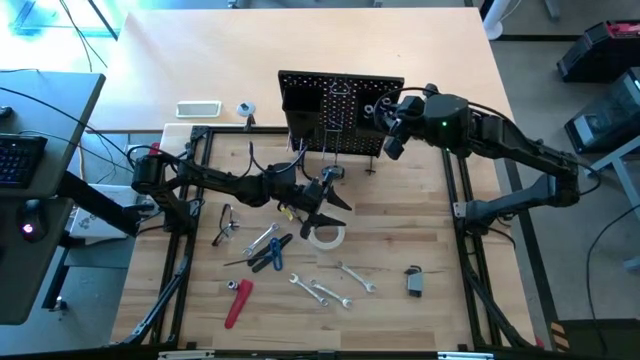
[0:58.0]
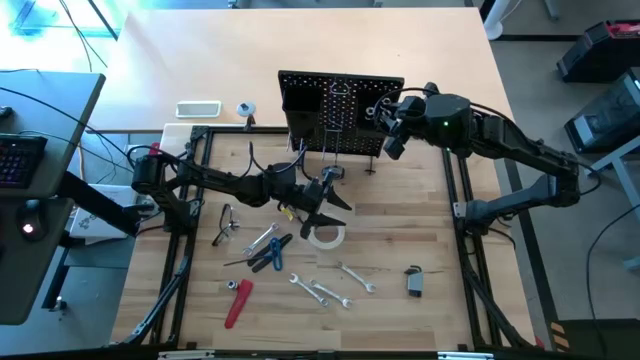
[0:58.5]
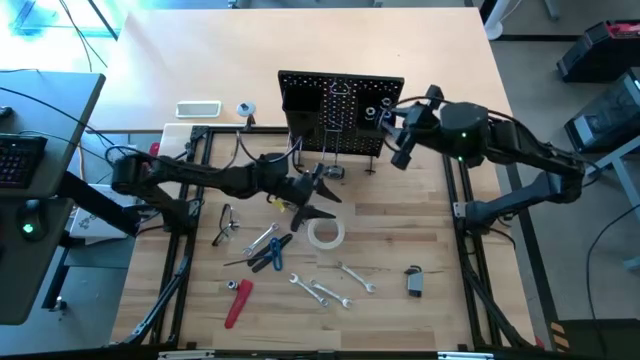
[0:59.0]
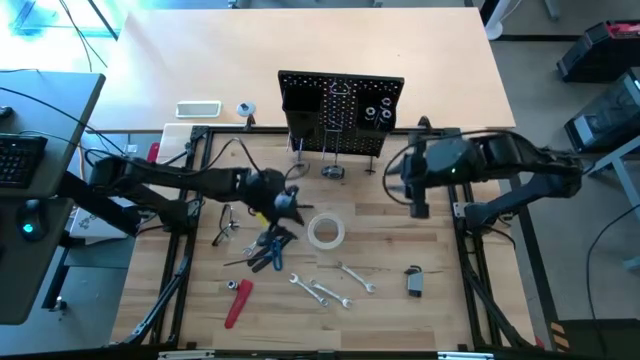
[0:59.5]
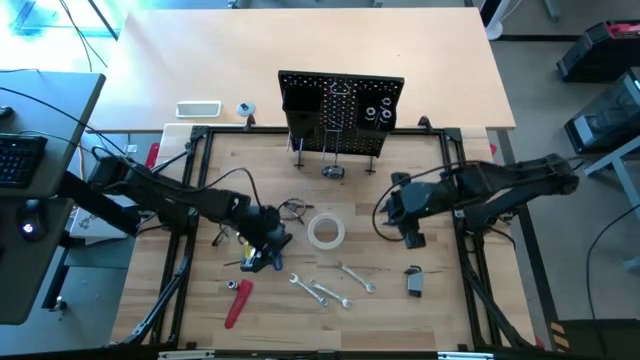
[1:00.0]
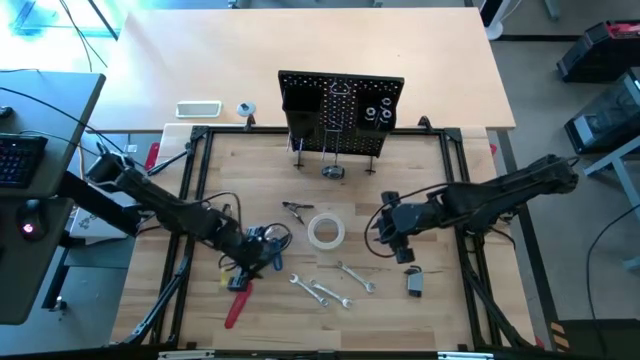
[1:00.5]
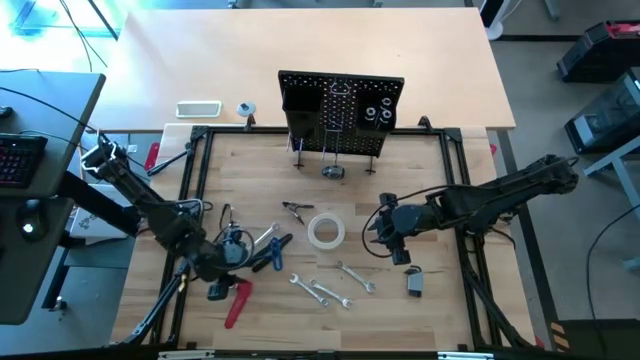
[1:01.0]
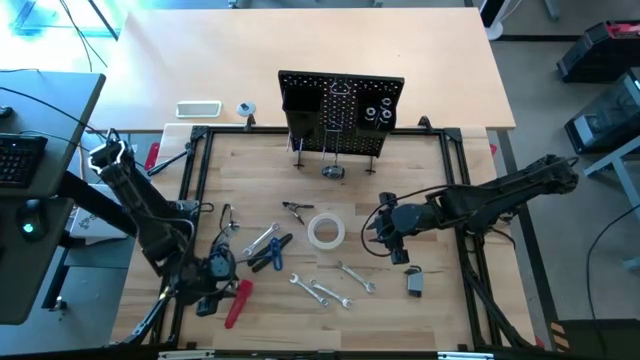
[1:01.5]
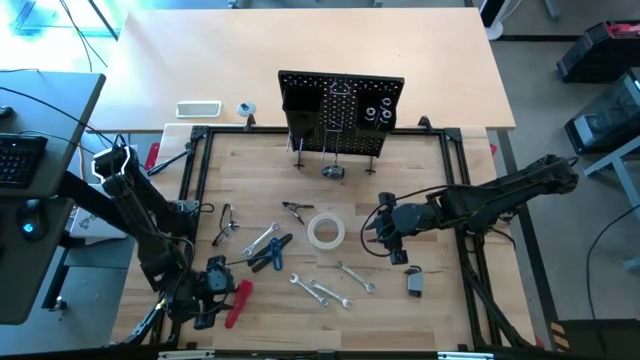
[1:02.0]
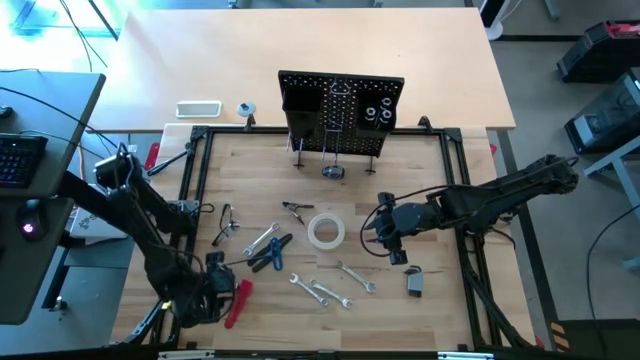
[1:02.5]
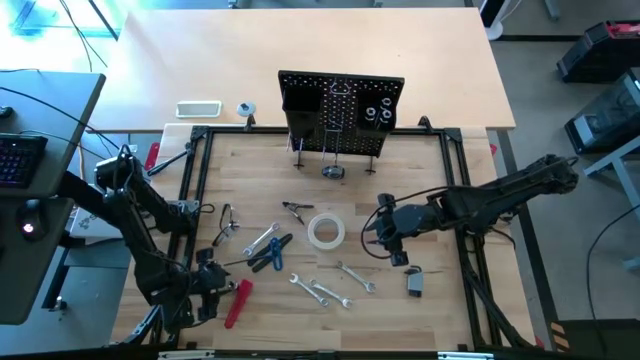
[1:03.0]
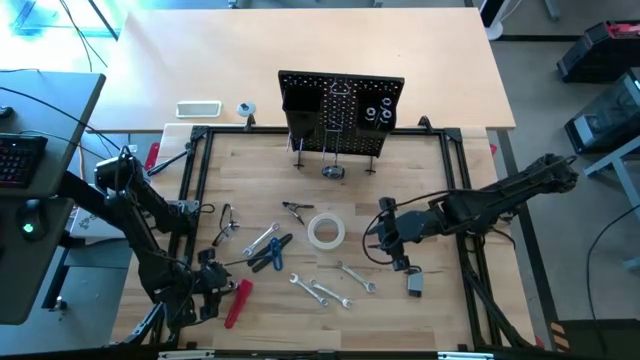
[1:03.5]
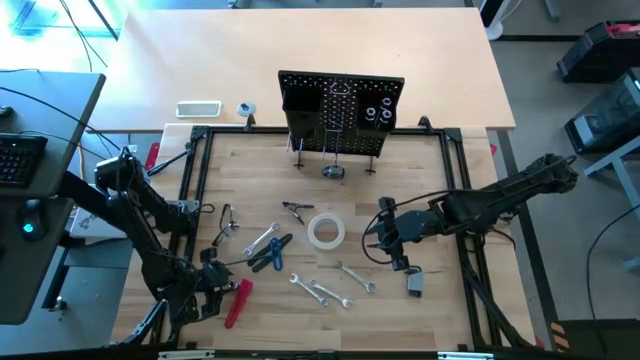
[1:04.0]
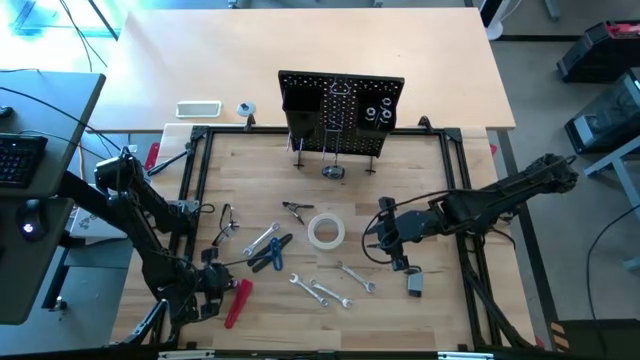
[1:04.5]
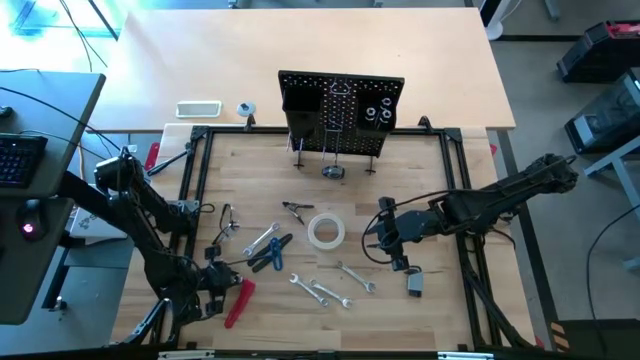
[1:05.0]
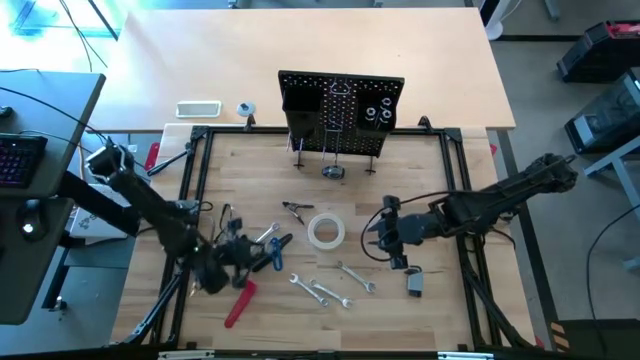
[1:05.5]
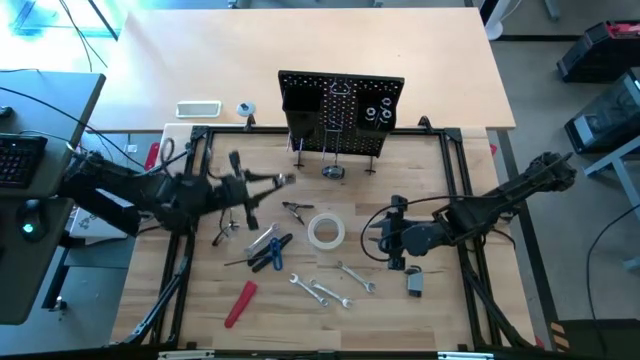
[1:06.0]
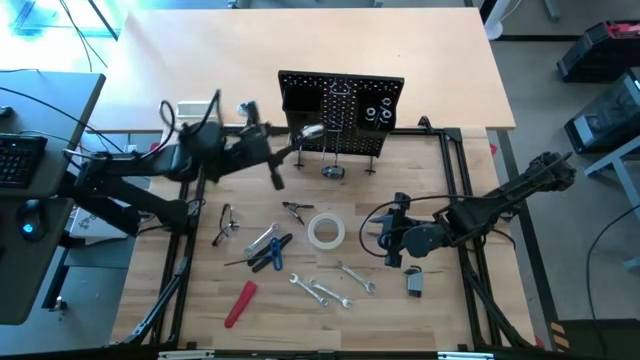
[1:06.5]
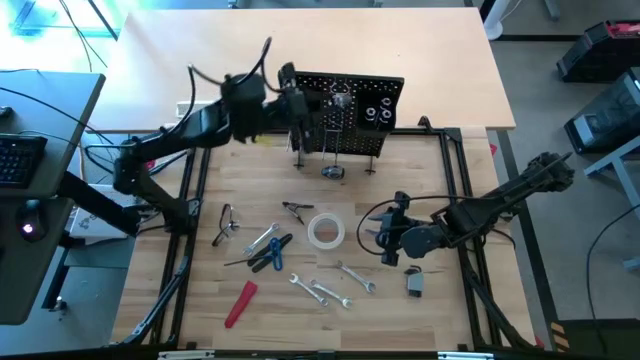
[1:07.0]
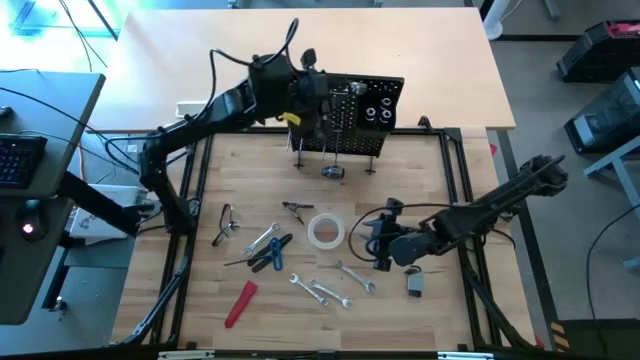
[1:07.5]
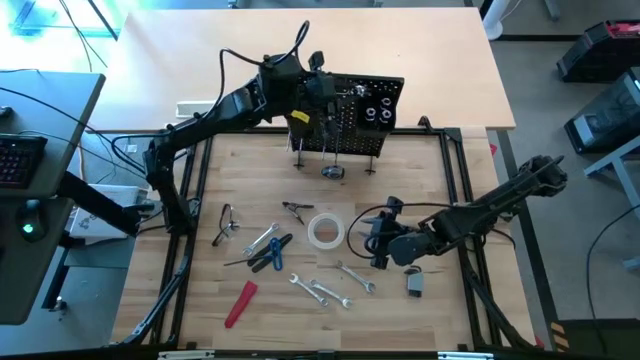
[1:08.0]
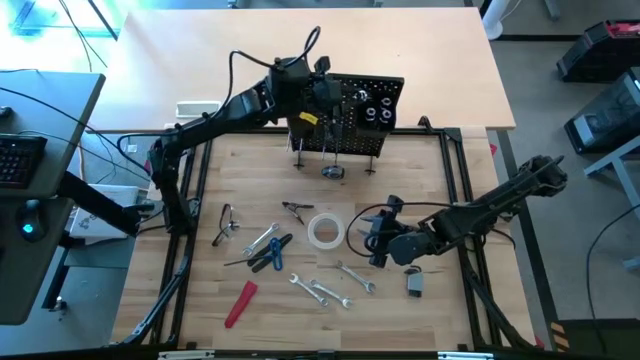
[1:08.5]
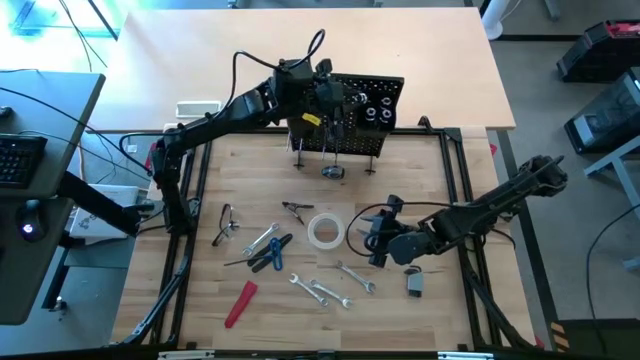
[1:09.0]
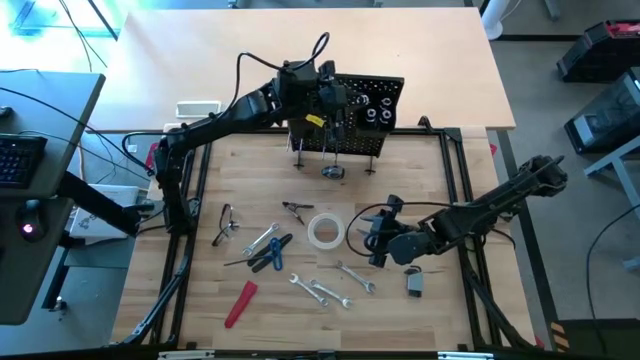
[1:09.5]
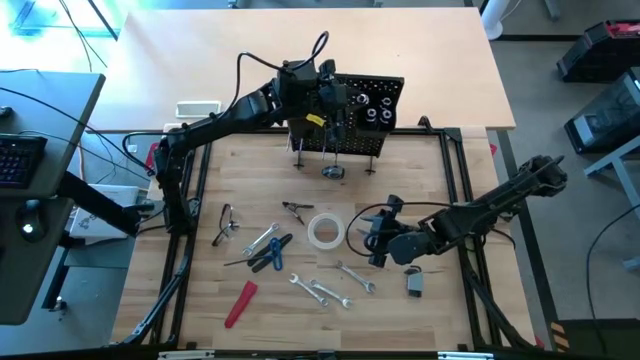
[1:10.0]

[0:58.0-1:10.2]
Task: Hang tools onto peg board
Put the silver socket into the right black bin on the peg board

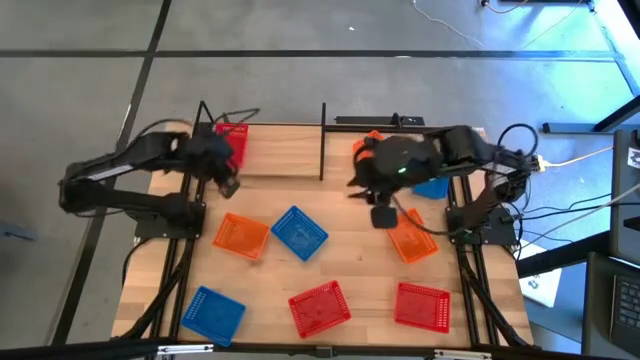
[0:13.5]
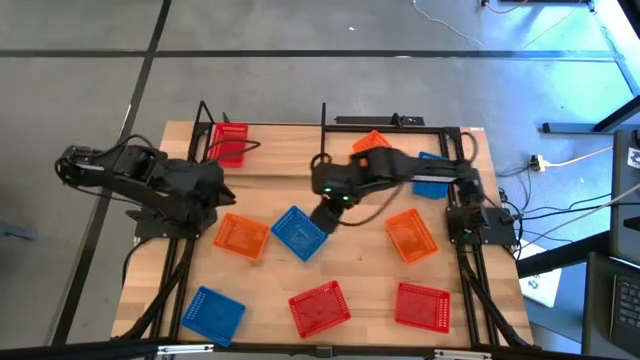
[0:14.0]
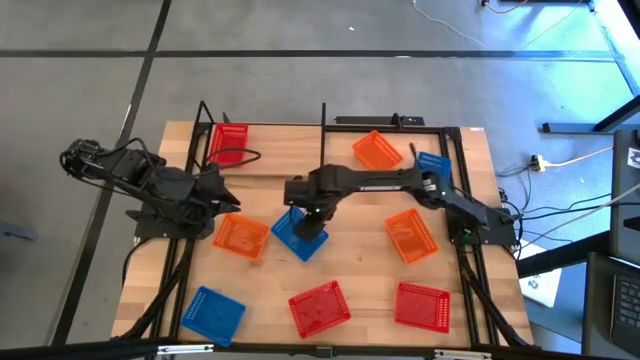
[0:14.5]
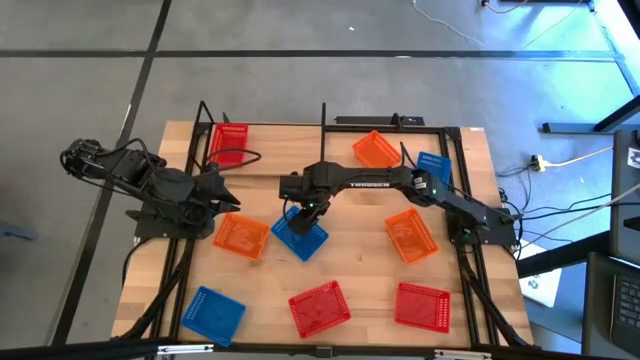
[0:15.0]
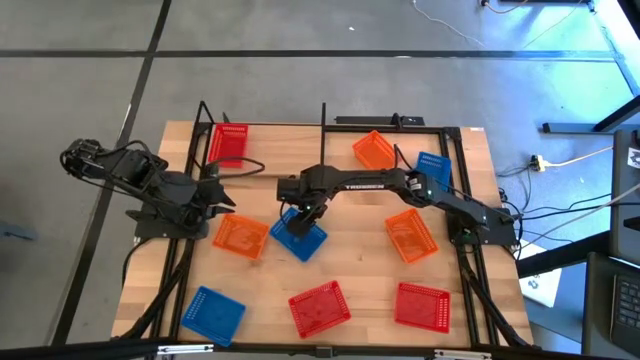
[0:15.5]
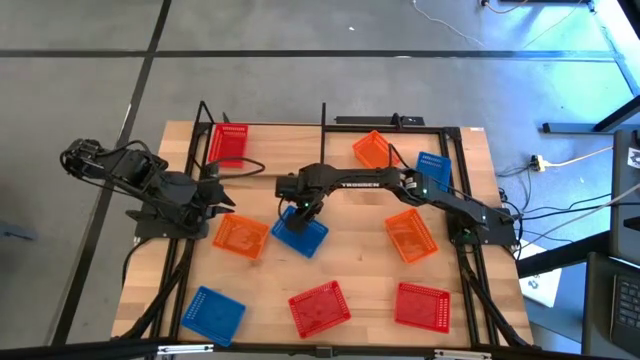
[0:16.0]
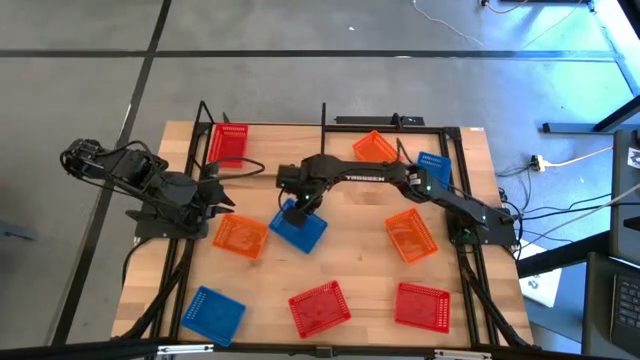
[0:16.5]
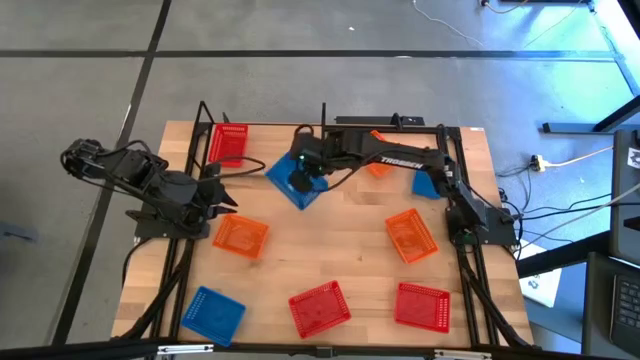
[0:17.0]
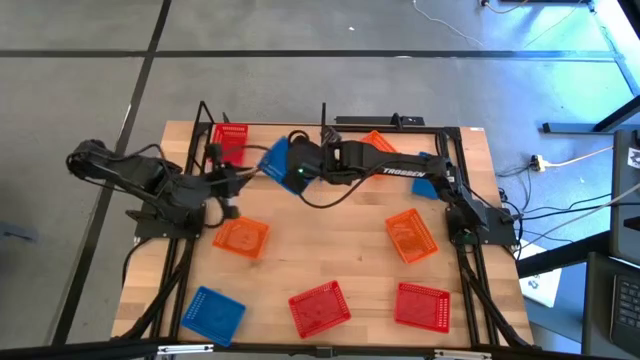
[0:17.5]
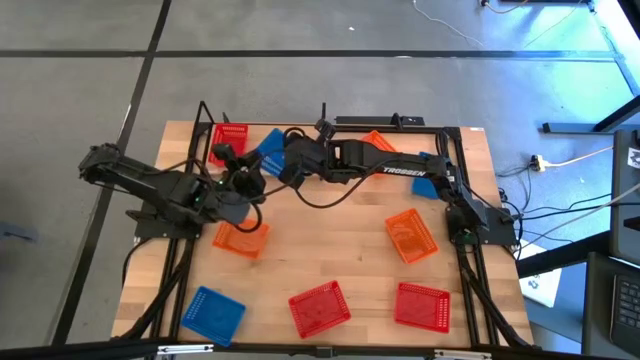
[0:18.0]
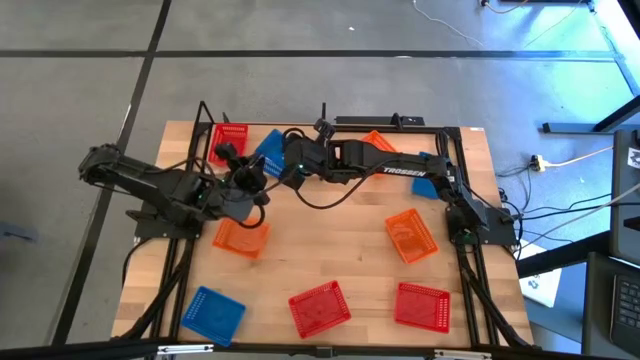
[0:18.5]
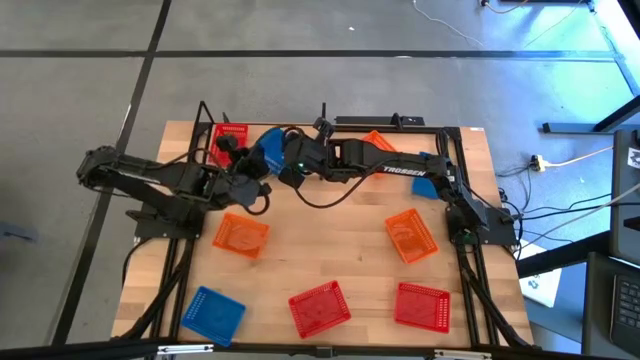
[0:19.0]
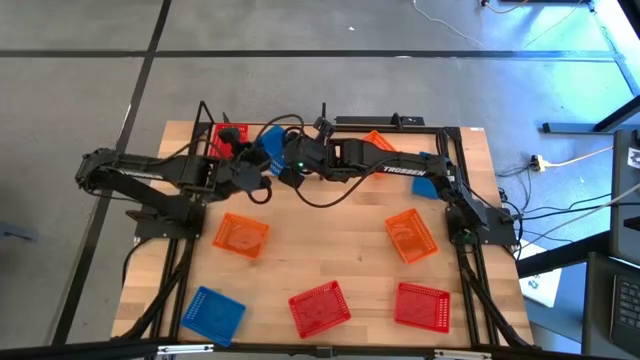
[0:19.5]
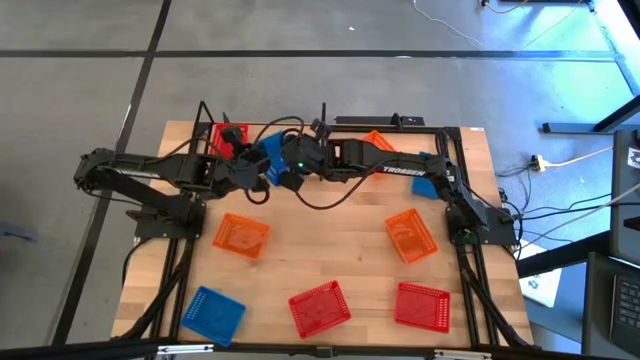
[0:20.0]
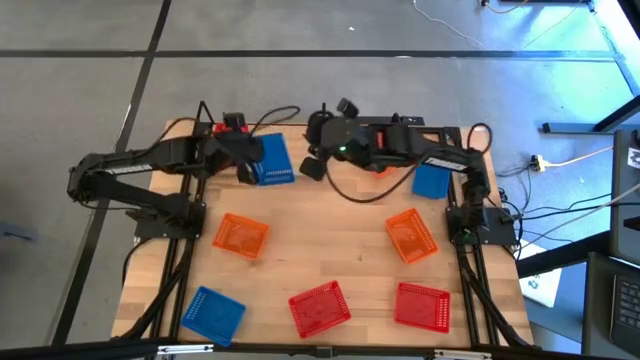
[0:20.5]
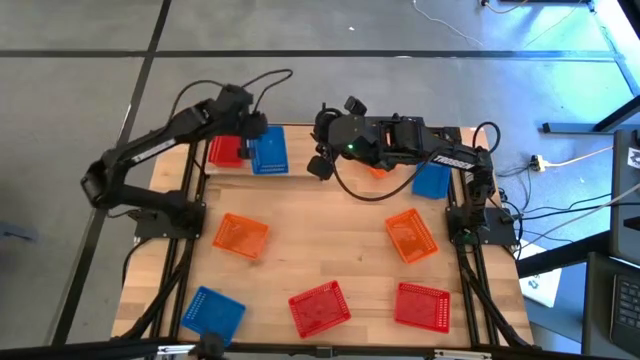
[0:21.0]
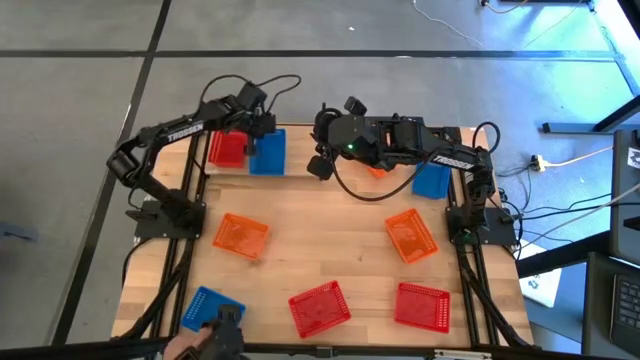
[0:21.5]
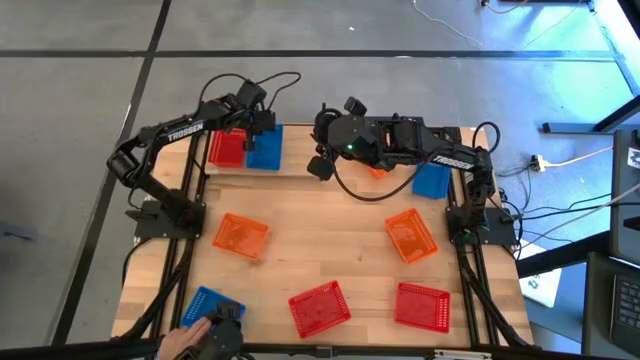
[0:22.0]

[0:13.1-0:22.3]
Task: Stack baskets on shelf by color
Put the center blue bin on the shelf
